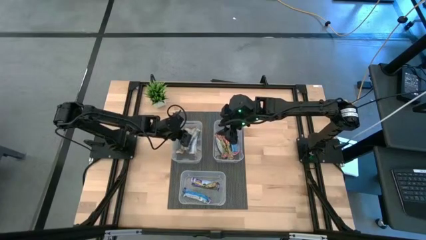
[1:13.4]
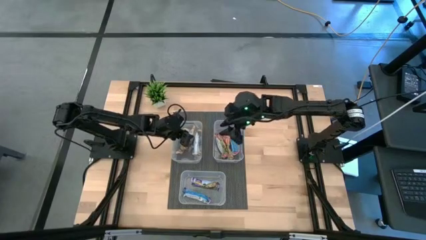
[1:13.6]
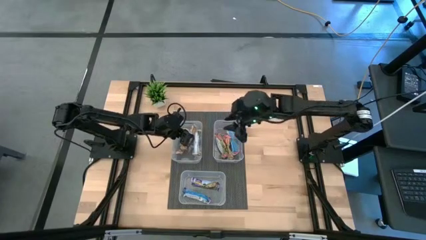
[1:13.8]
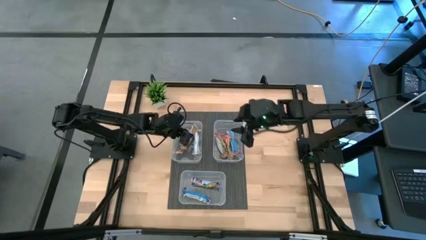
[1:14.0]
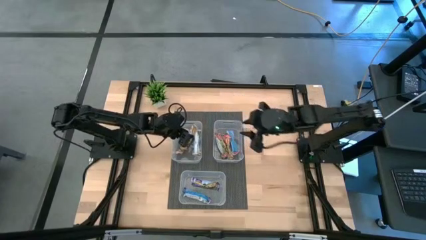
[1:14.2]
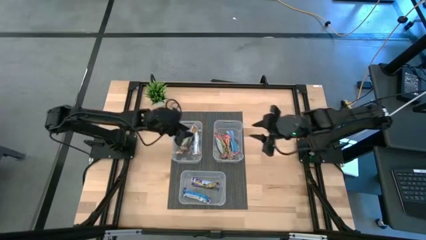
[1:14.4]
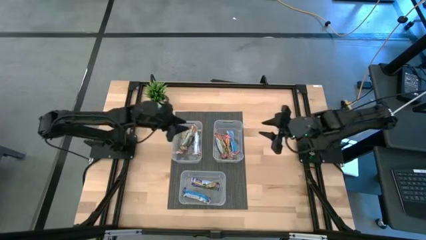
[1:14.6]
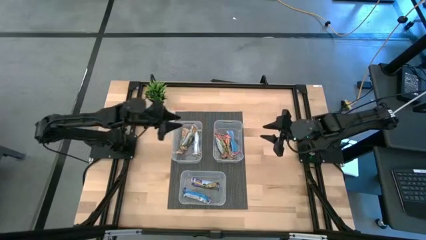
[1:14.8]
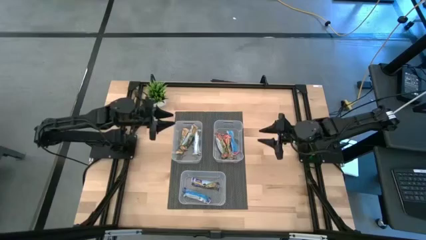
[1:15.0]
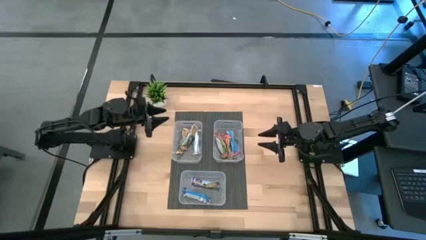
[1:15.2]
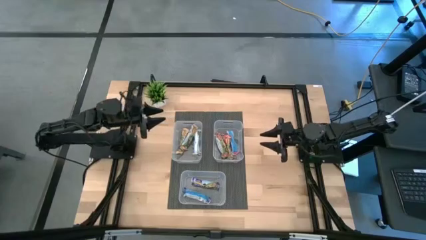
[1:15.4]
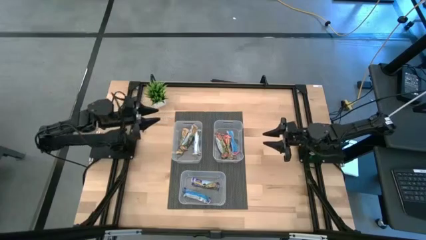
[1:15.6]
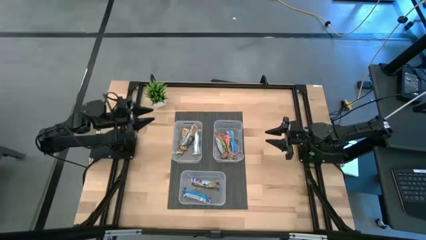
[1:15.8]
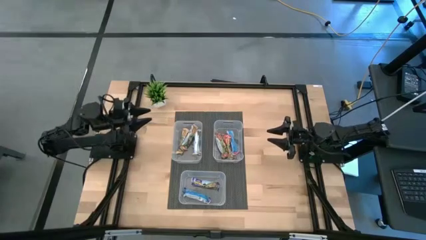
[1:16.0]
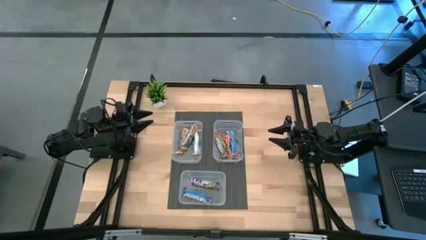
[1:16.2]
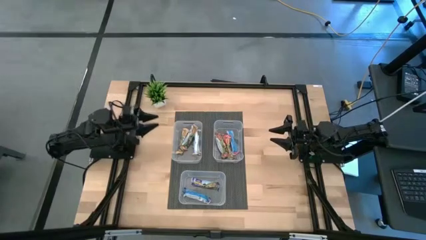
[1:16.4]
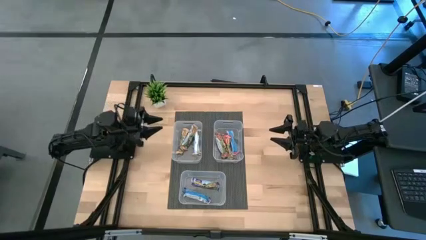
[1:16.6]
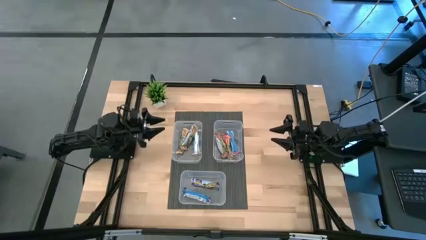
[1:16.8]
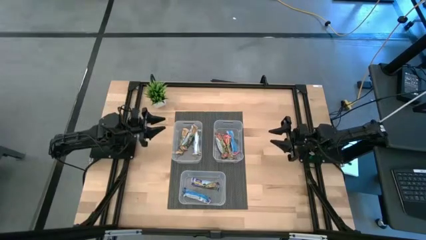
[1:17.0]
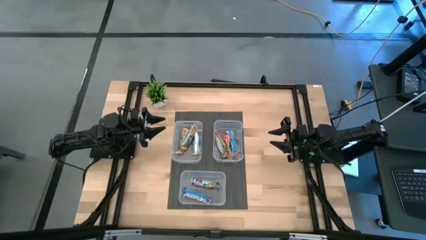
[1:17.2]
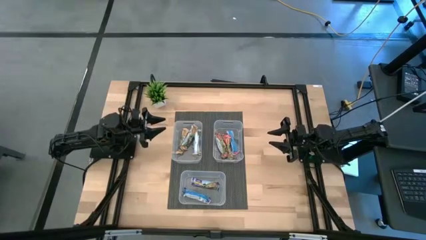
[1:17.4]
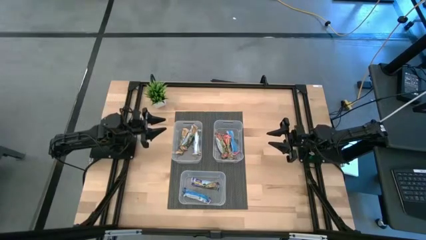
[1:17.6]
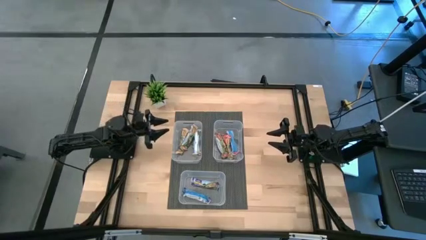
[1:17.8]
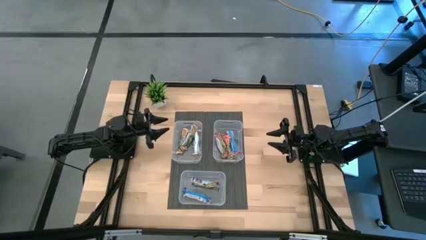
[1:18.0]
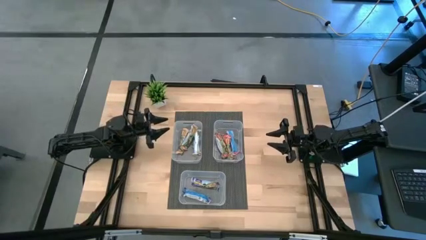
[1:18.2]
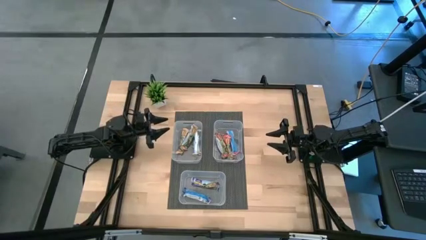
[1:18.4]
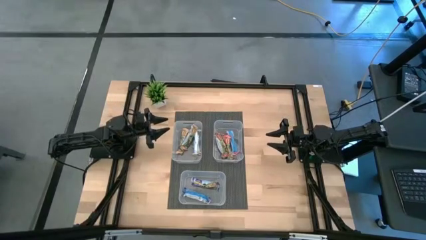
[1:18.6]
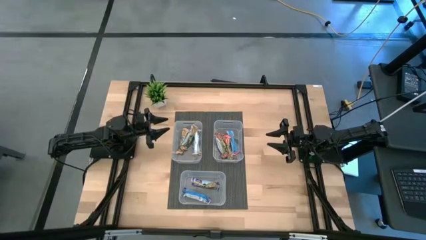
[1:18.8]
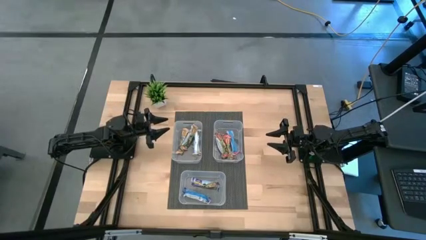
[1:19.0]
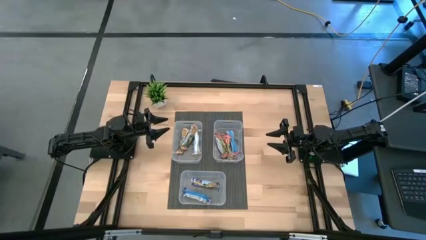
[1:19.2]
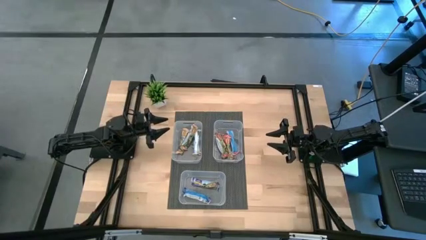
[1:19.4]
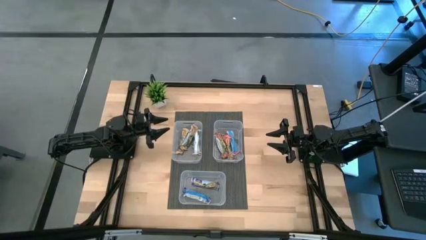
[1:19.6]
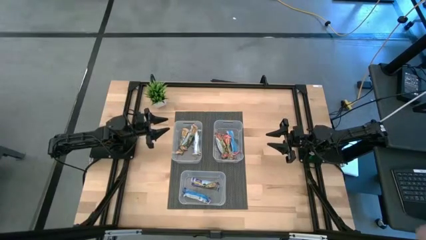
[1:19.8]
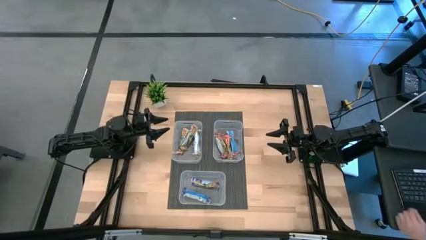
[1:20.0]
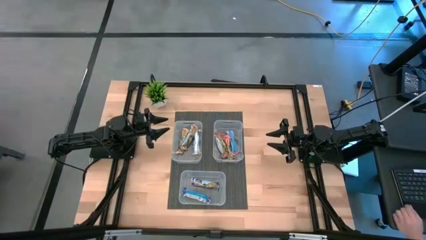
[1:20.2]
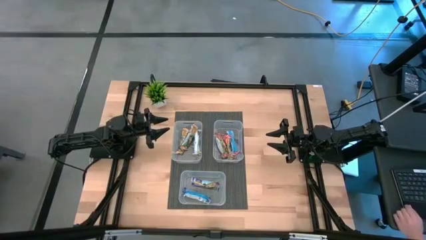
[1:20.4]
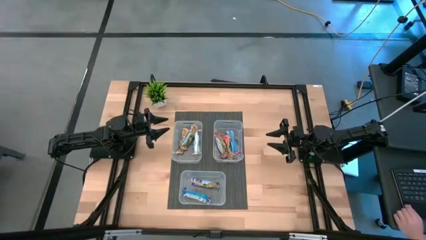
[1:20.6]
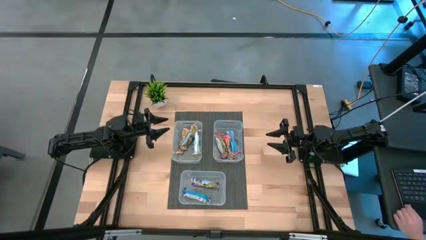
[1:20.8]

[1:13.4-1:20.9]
Task: Pick and place Granola Bars by type
Return to Home Position

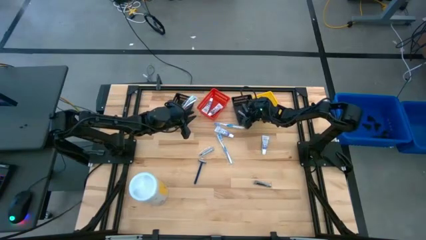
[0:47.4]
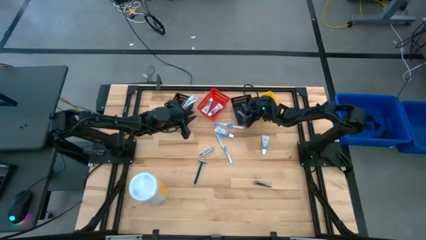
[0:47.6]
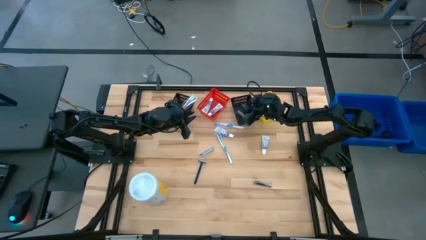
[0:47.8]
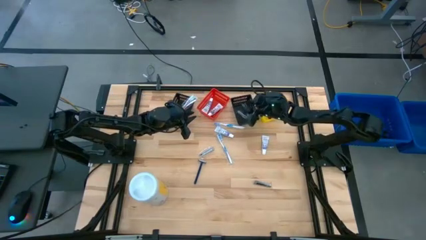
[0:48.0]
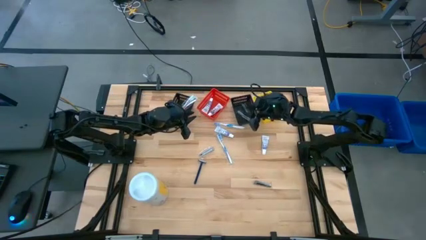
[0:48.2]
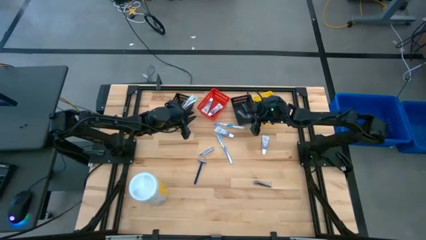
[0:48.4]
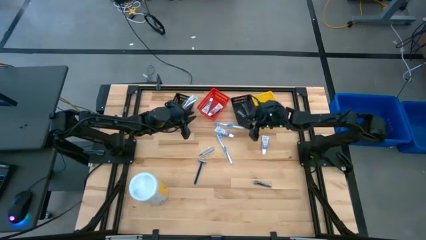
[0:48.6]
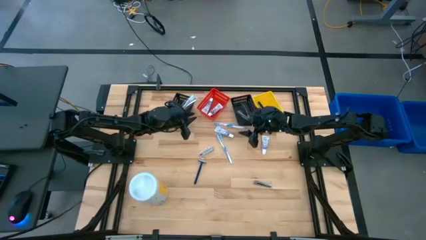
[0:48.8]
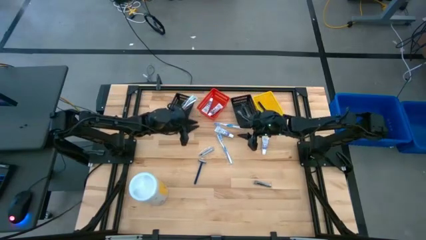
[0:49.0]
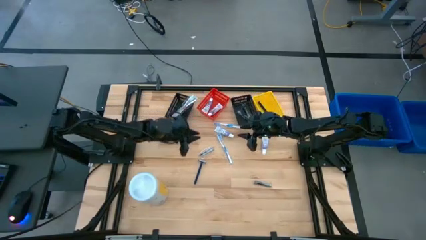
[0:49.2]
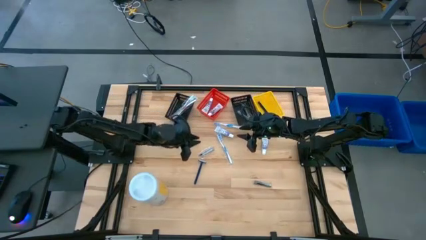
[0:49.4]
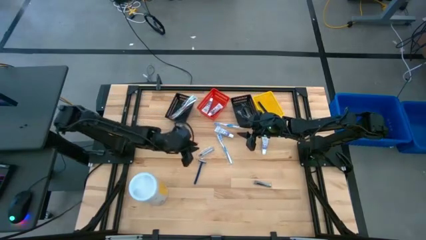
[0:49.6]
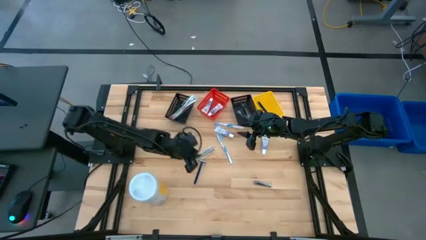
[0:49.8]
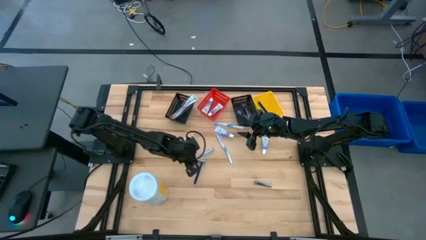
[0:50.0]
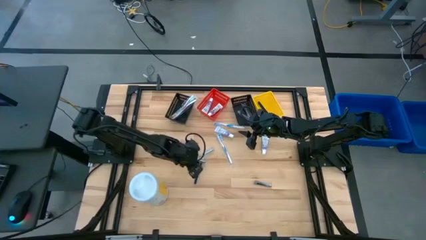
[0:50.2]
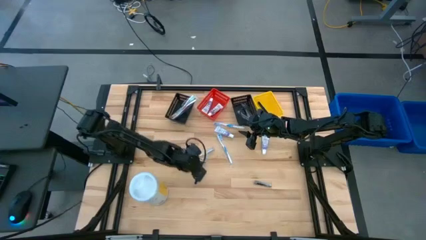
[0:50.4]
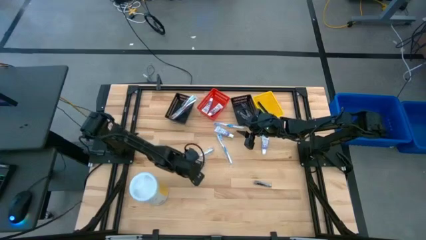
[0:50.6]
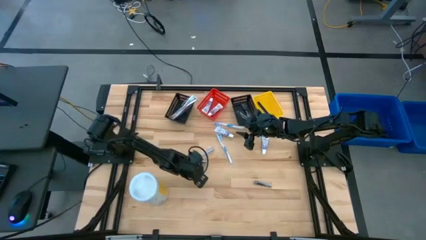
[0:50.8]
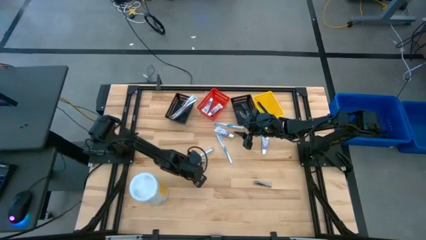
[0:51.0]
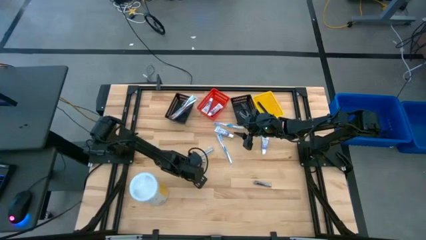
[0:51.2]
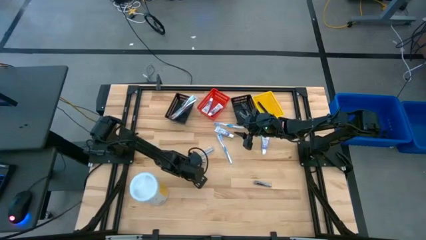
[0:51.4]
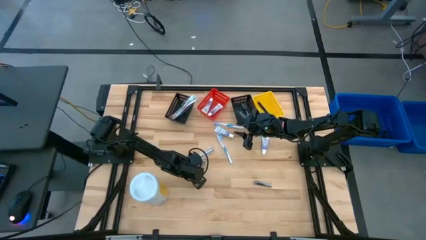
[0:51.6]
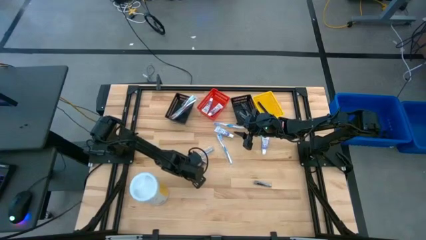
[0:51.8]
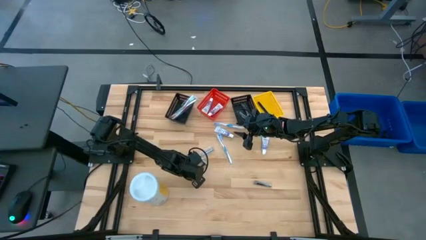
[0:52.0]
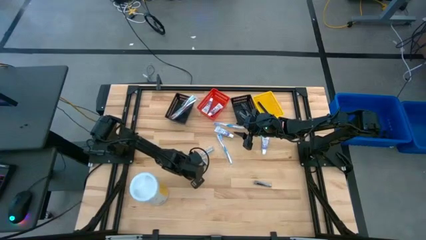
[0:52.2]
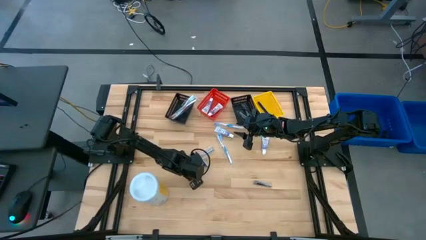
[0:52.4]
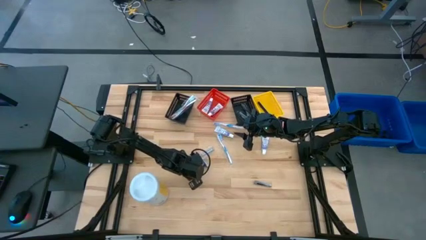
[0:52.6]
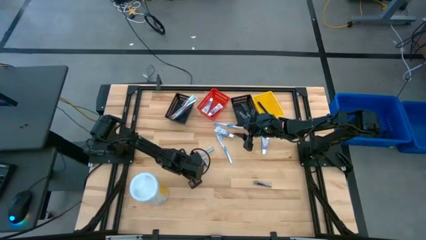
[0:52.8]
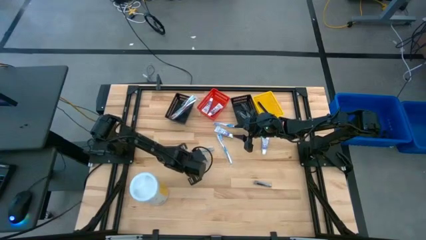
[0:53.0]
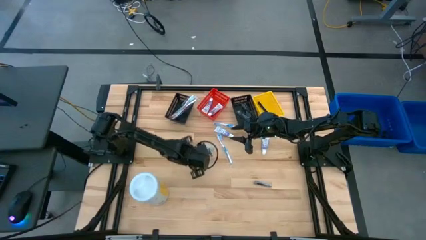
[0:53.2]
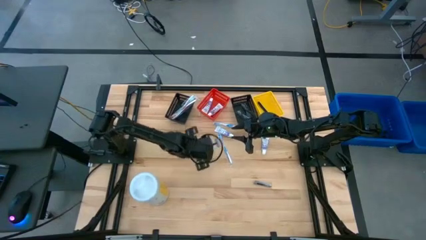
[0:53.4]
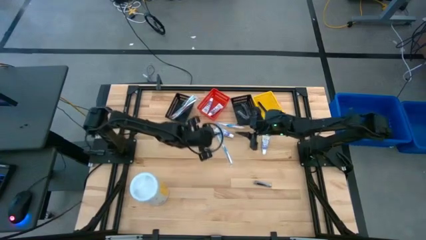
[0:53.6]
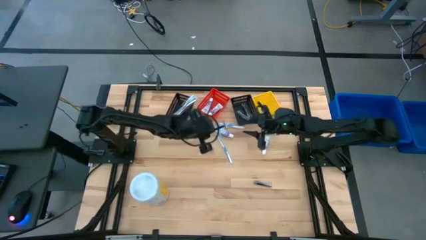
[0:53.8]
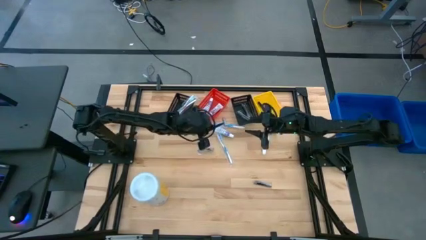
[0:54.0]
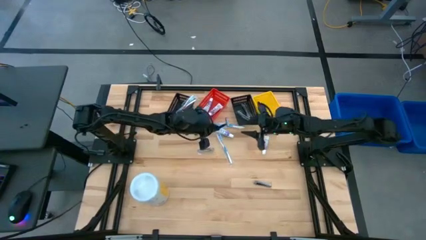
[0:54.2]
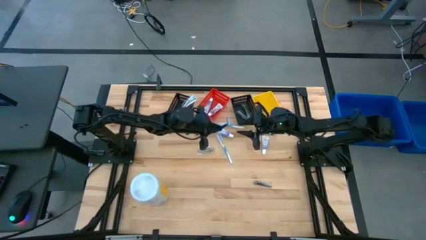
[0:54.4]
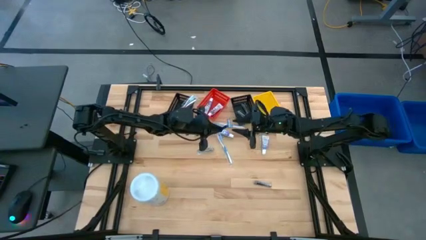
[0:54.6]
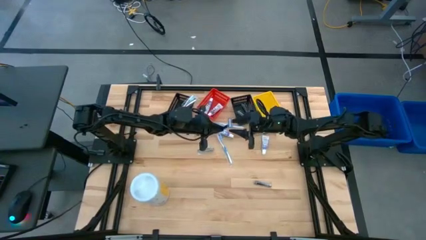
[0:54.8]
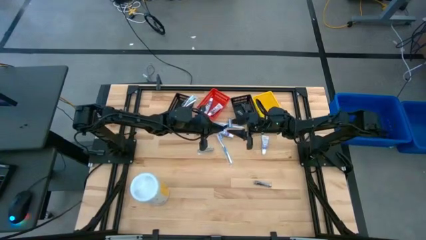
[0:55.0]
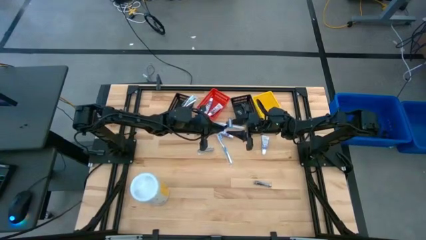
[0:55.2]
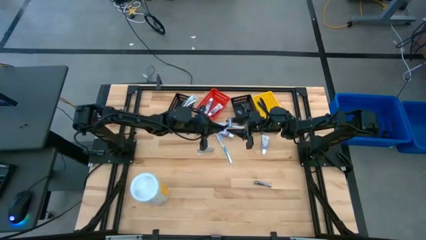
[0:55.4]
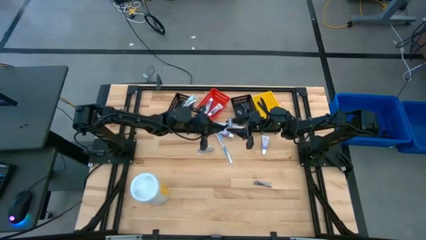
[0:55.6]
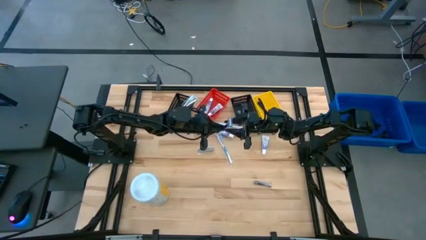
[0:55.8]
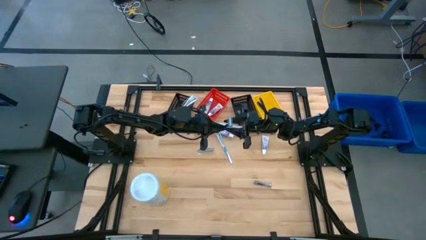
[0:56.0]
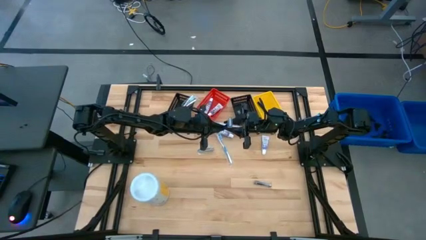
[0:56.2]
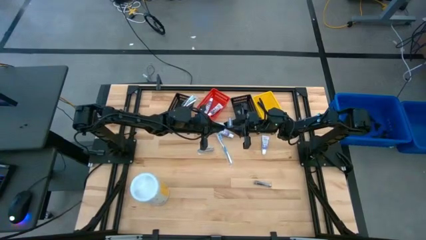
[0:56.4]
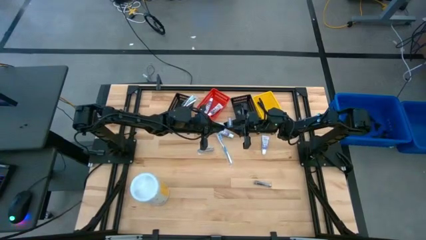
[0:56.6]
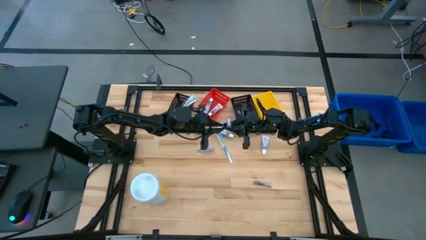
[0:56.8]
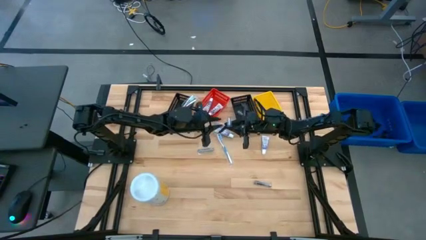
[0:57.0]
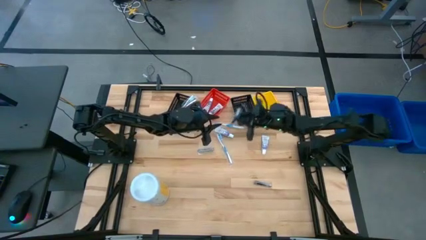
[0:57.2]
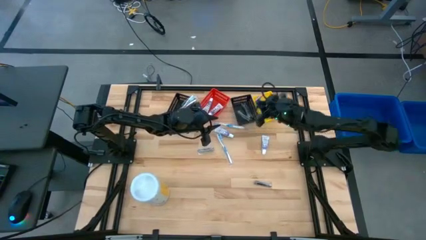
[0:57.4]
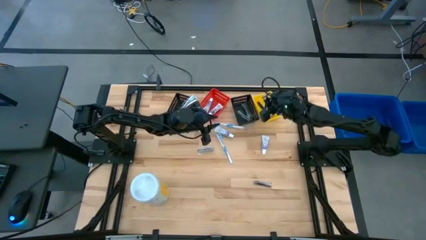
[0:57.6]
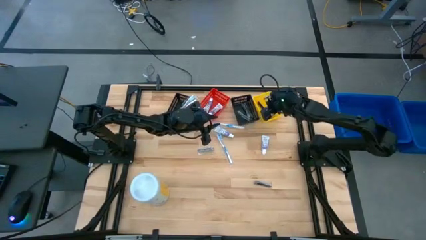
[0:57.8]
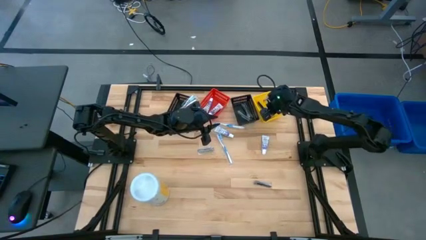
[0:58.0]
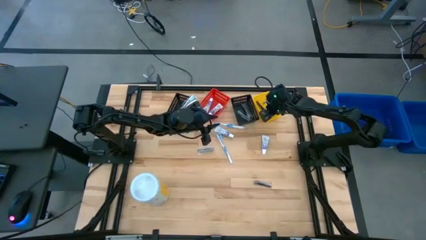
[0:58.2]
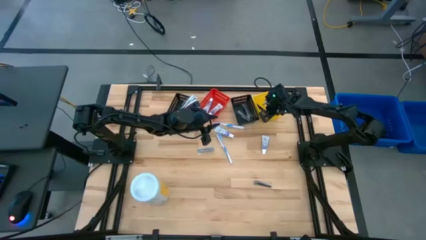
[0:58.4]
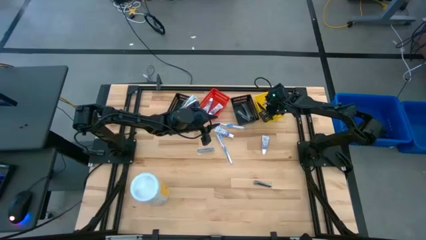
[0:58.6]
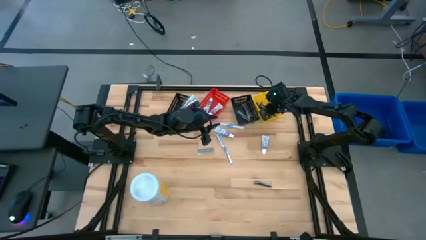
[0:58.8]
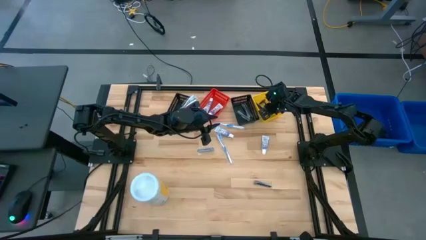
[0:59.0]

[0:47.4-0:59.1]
Task: Pick & Place Travel size toiletries
Put the razor into the yellow bin
